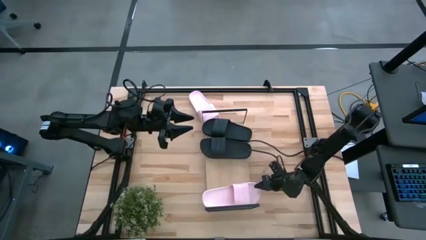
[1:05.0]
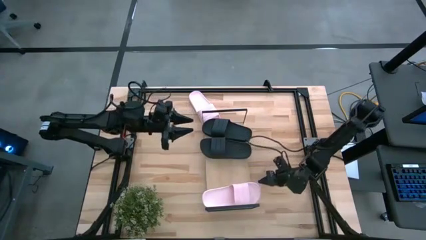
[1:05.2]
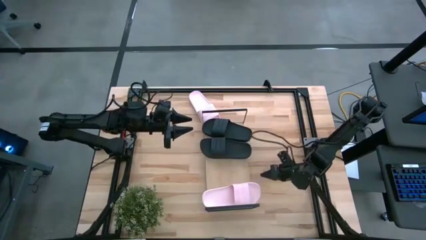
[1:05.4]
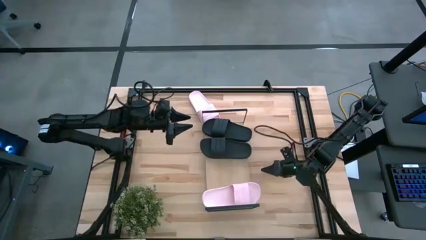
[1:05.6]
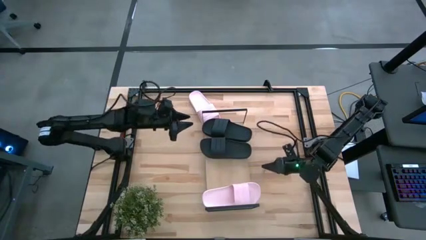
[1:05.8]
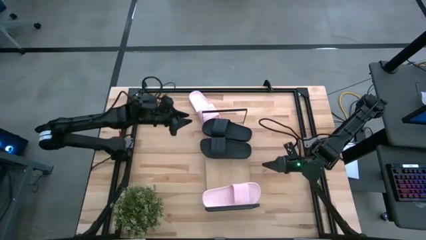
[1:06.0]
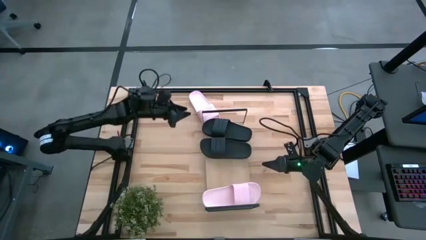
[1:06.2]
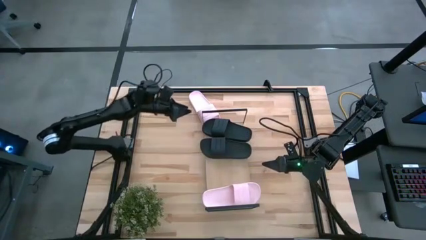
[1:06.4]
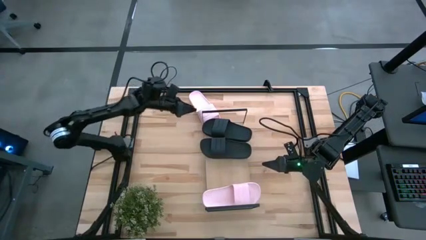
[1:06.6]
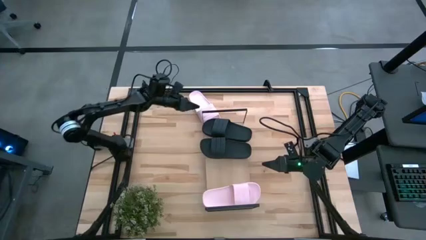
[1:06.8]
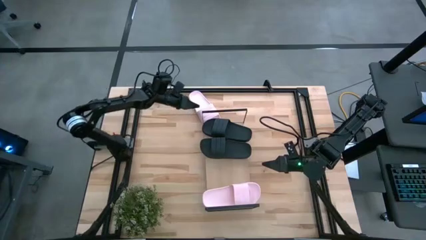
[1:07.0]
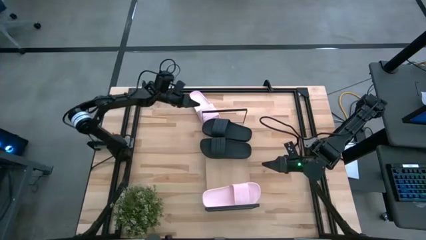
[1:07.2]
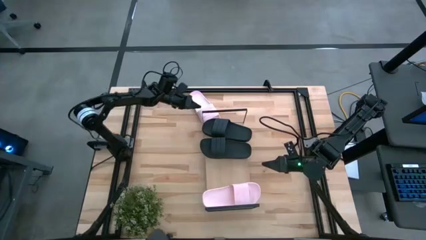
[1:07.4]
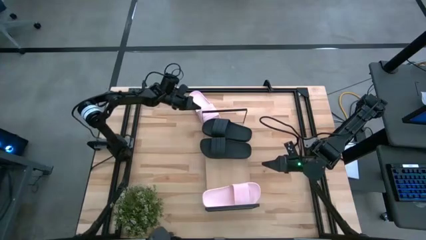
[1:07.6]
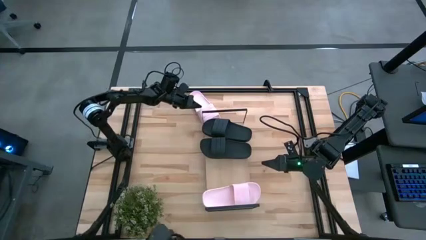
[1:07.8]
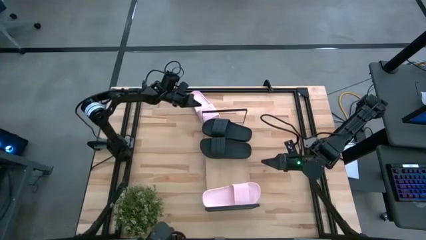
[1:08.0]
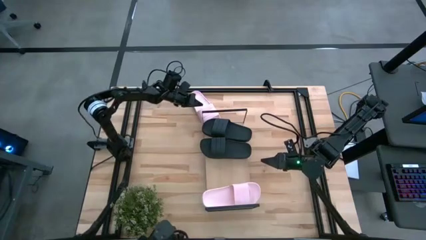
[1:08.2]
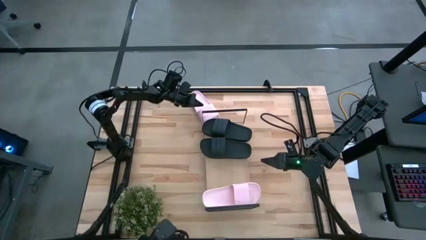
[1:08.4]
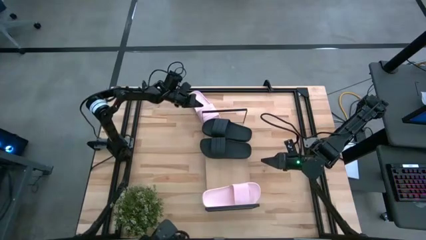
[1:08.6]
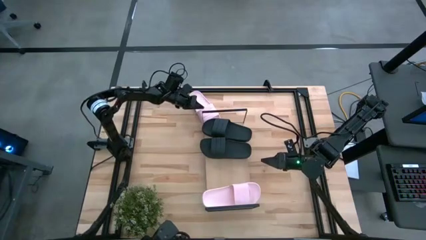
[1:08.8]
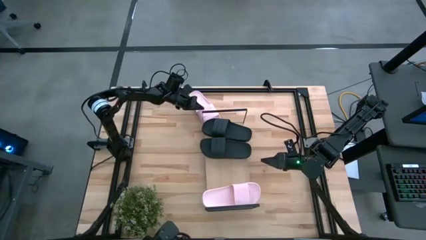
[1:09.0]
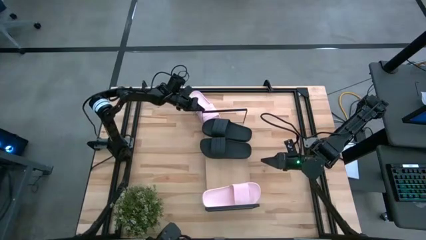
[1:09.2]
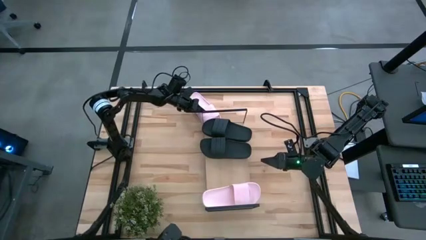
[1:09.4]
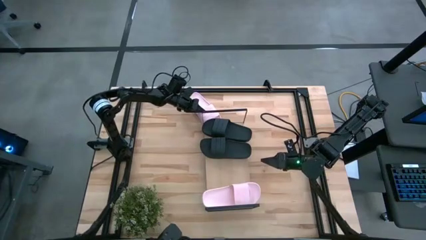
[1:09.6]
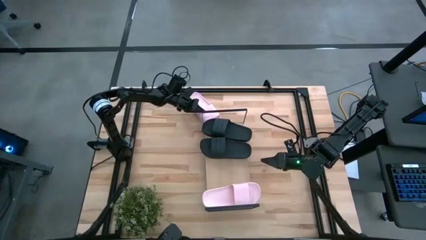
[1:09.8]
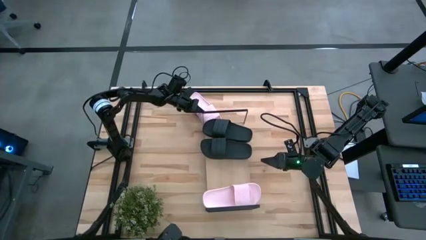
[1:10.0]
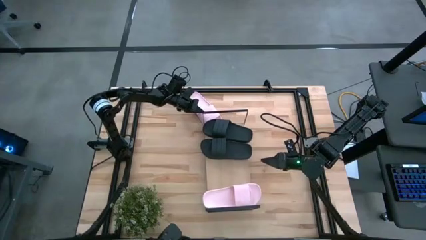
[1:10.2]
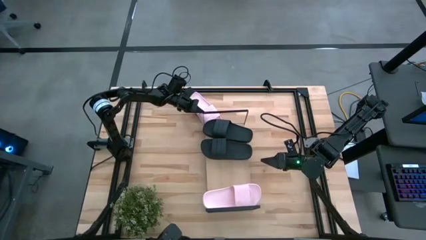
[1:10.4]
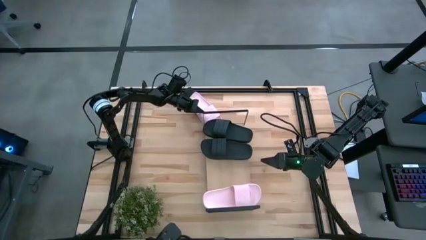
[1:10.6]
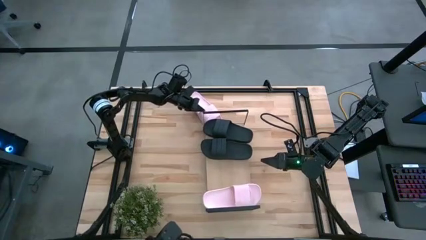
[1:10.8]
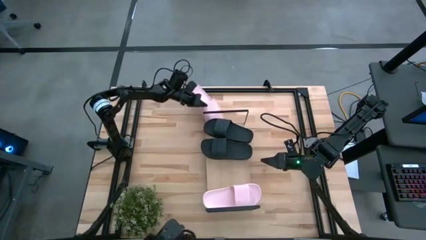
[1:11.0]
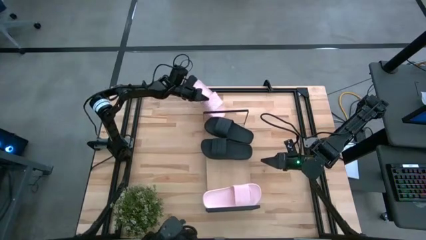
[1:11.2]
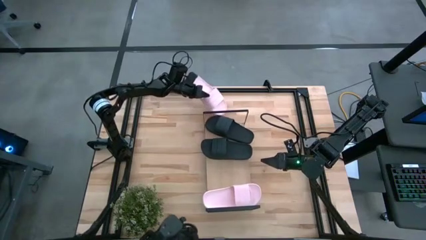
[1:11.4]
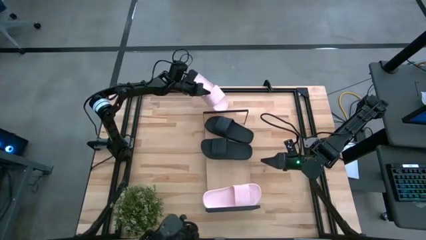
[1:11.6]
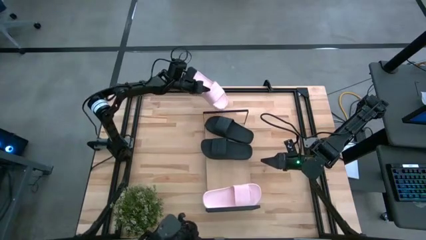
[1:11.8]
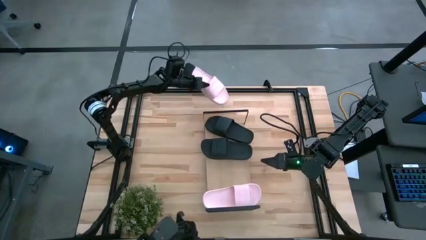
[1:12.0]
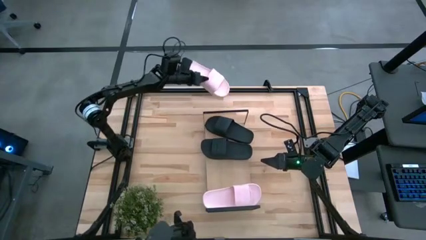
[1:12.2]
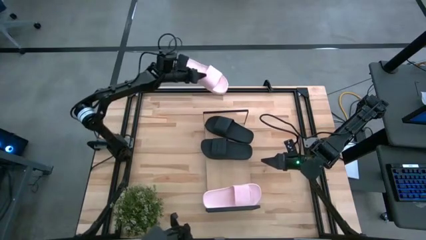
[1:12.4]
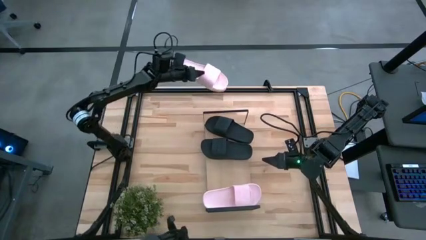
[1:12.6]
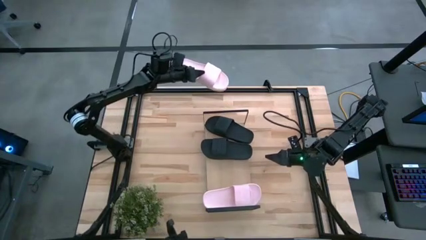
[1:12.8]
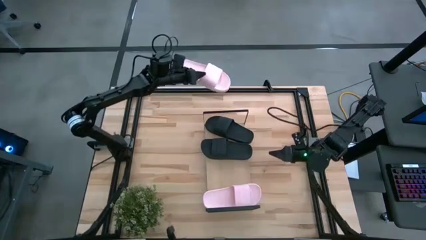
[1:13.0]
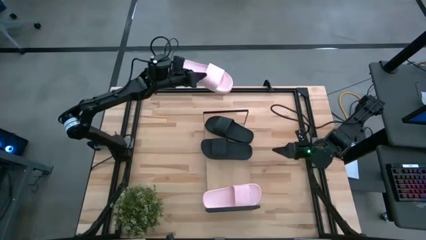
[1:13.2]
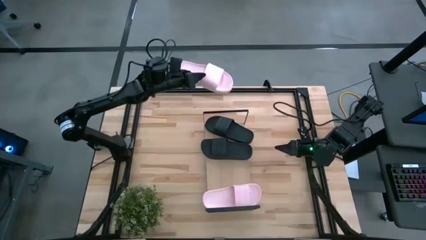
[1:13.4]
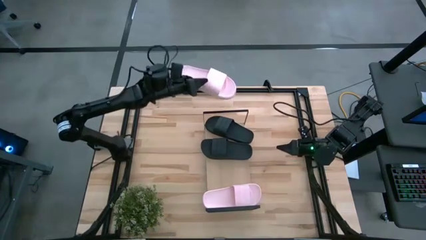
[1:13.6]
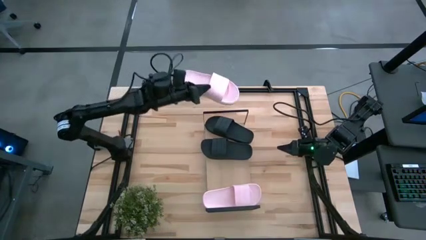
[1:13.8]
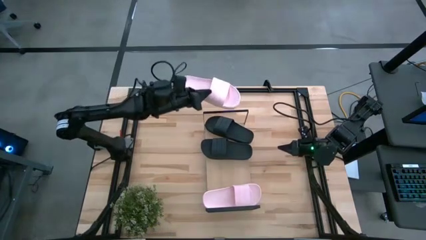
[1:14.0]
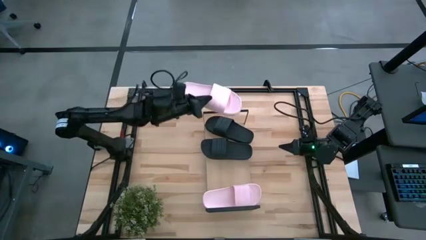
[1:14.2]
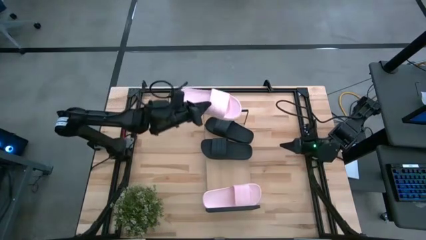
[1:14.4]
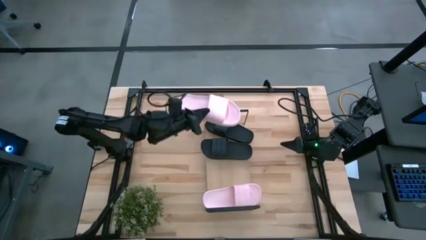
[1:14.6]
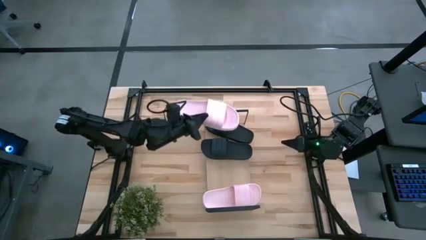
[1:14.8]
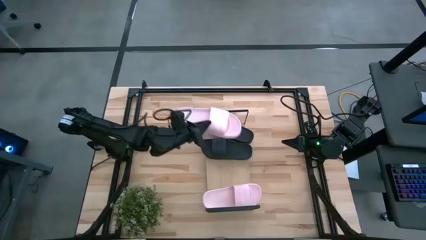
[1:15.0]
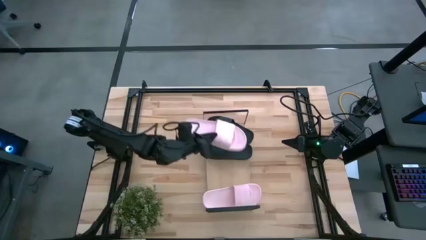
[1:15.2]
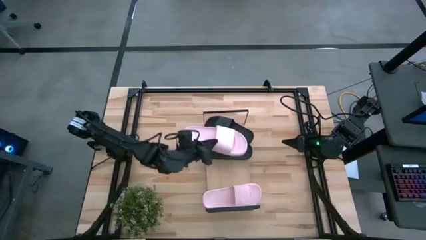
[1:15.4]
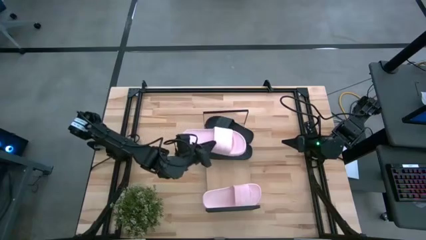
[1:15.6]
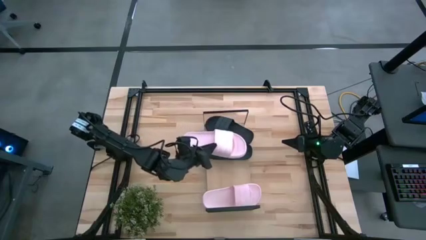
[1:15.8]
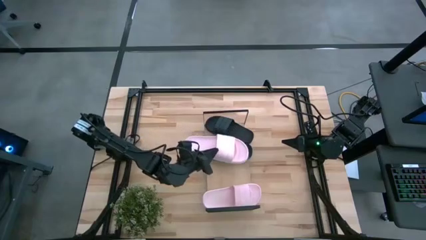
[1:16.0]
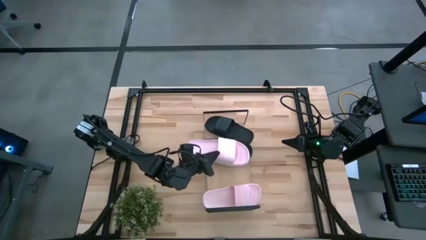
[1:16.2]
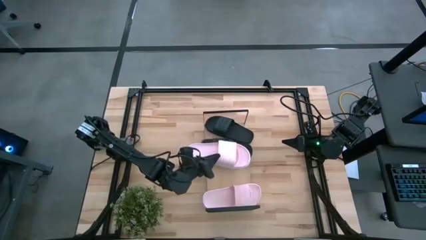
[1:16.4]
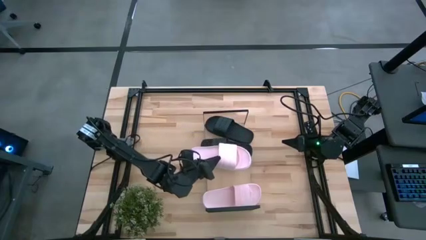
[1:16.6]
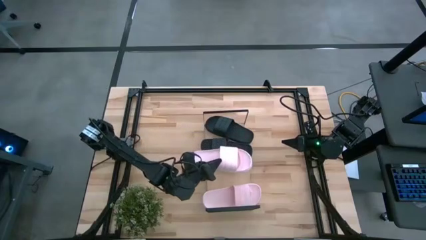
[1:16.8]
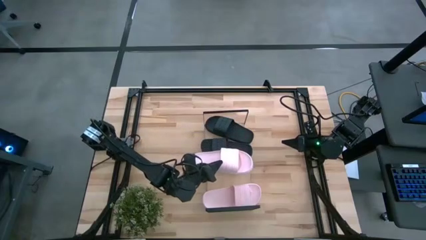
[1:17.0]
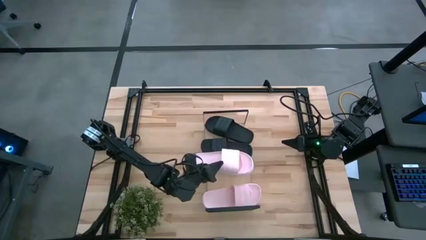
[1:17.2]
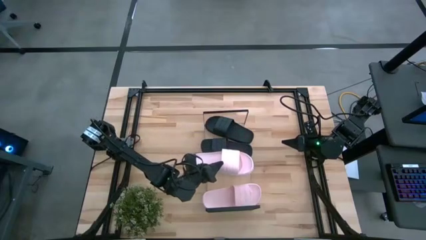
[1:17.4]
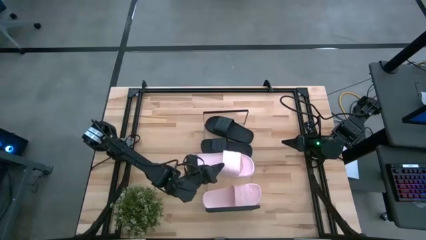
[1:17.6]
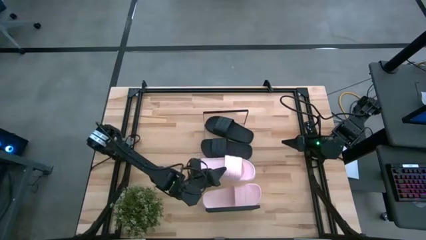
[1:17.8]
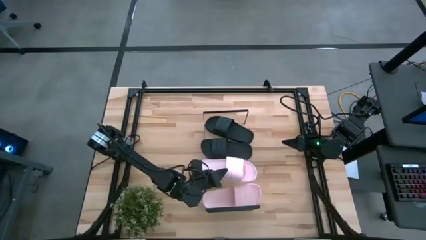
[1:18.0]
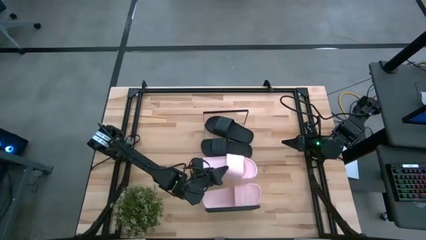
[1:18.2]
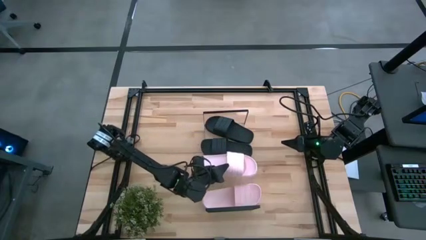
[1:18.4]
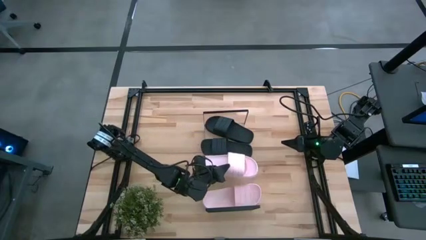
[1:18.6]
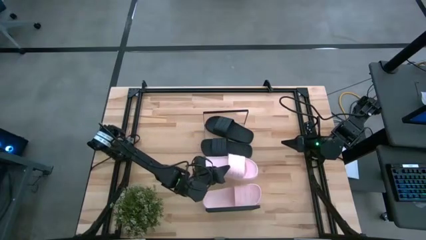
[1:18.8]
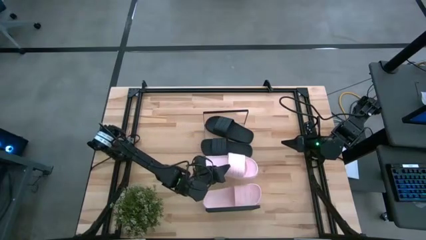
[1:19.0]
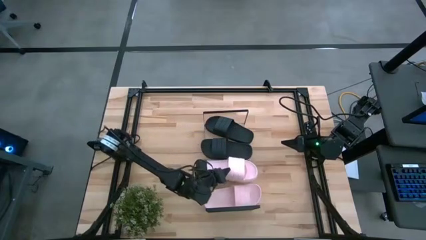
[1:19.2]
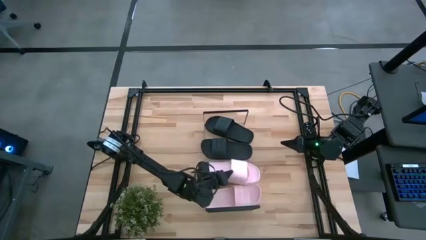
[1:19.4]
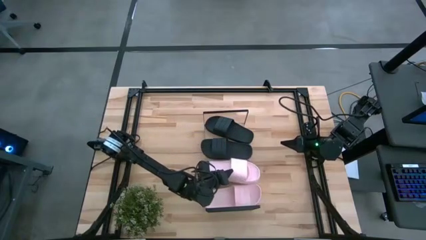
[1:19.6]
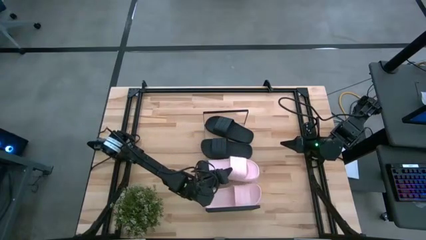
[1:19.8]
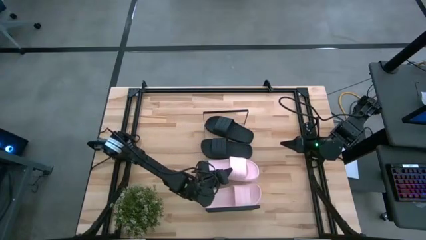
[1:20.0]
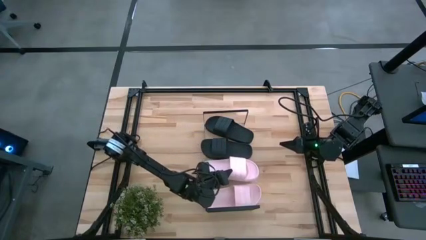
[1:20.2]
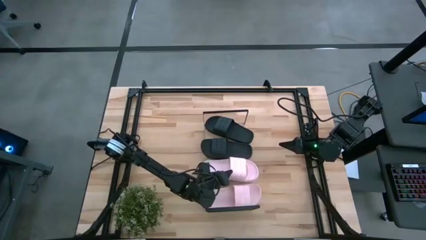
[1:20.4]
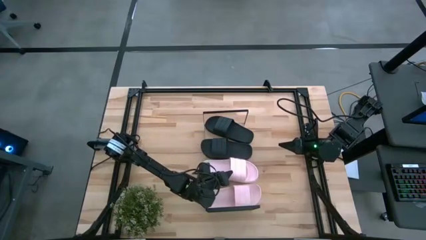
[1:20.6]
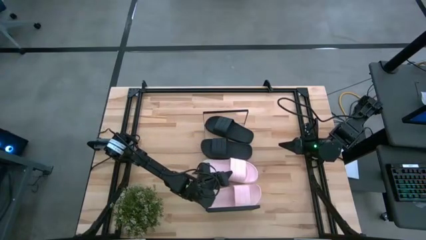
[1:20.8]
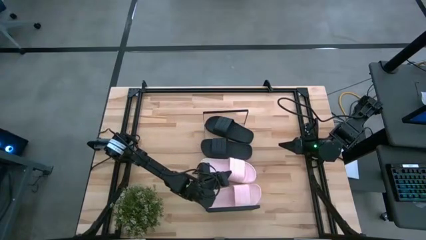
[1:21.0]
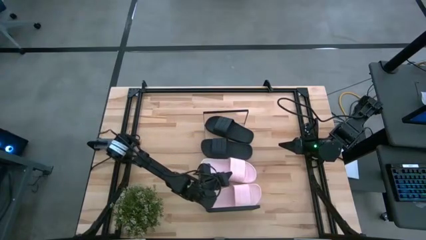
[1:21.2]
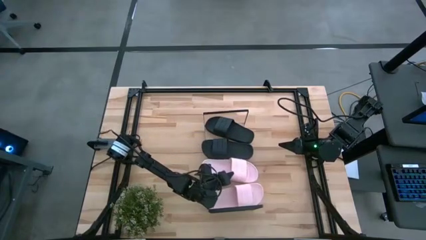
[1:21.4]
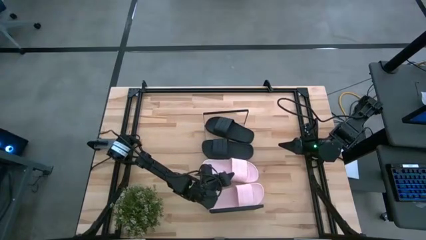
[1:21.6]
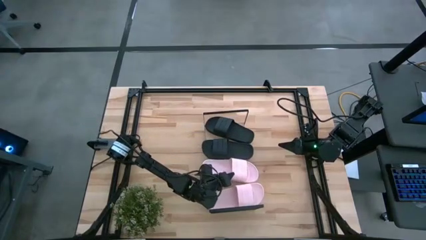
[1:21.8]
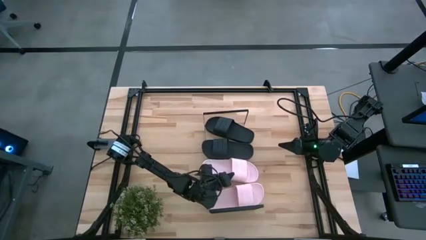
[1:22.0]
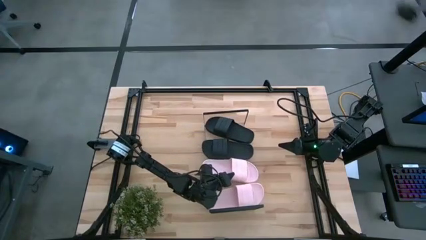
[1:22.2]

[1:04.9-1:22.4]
Task: Pick and place slides into the shelf
Put the pink slide on the shelf
